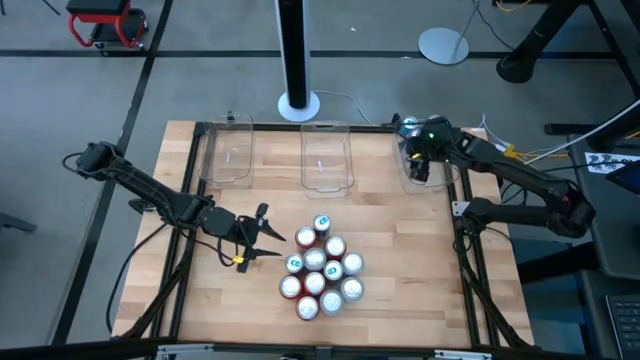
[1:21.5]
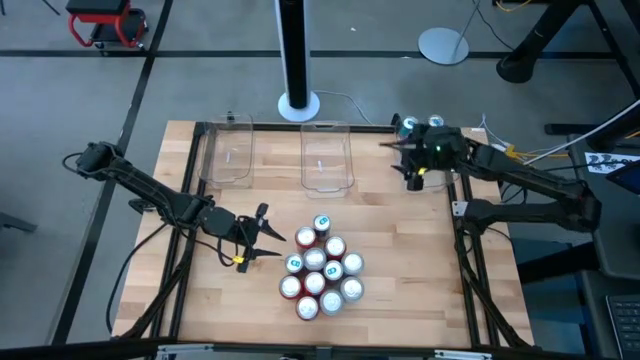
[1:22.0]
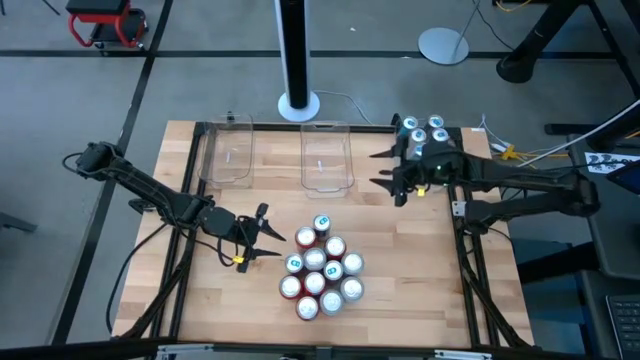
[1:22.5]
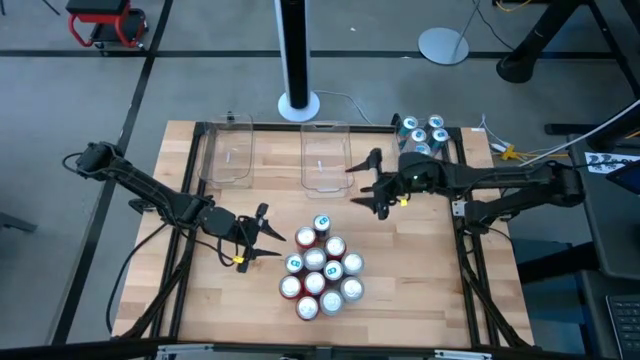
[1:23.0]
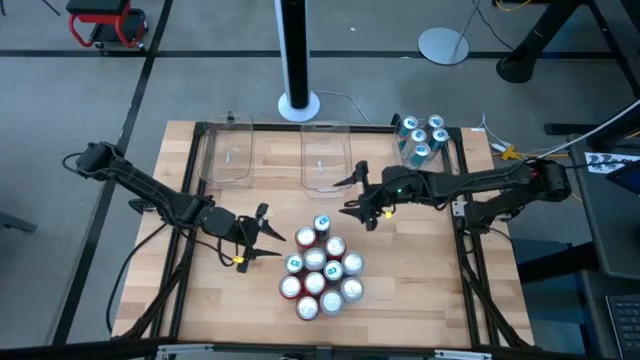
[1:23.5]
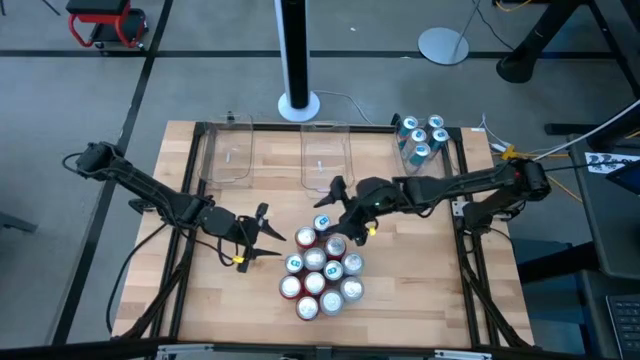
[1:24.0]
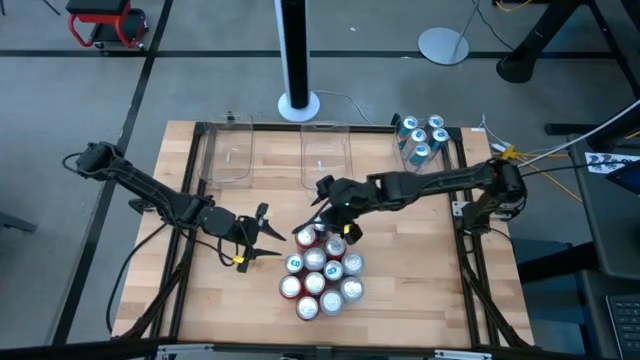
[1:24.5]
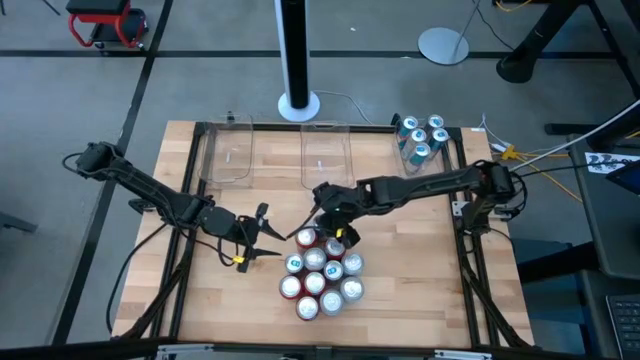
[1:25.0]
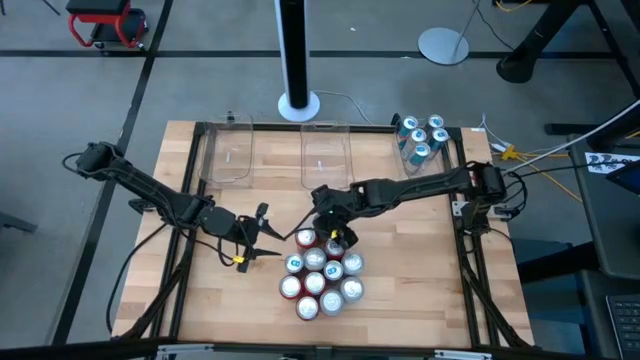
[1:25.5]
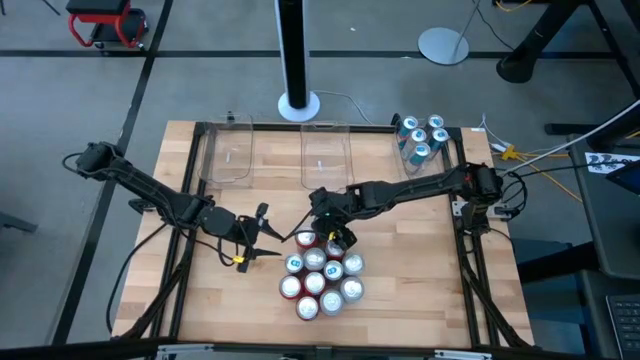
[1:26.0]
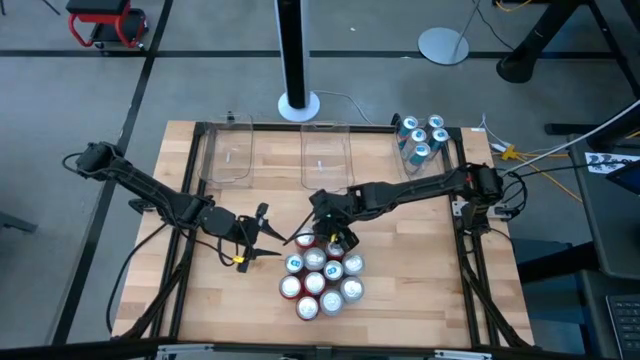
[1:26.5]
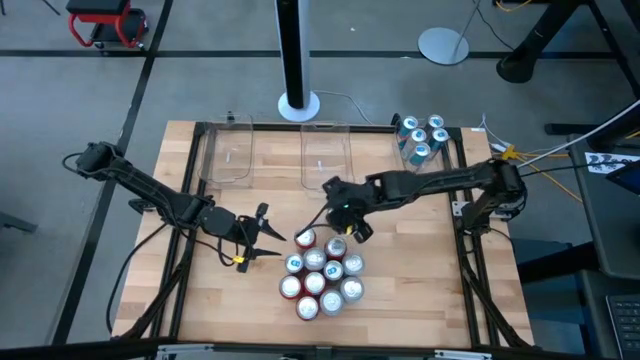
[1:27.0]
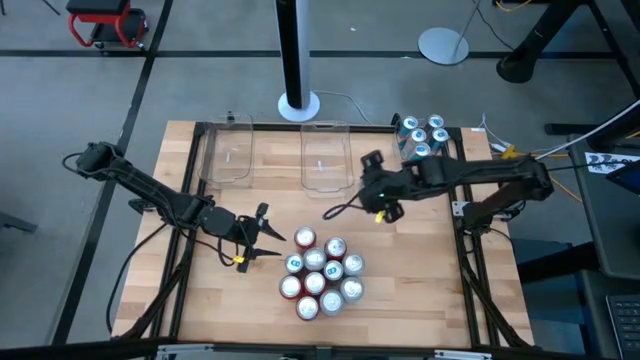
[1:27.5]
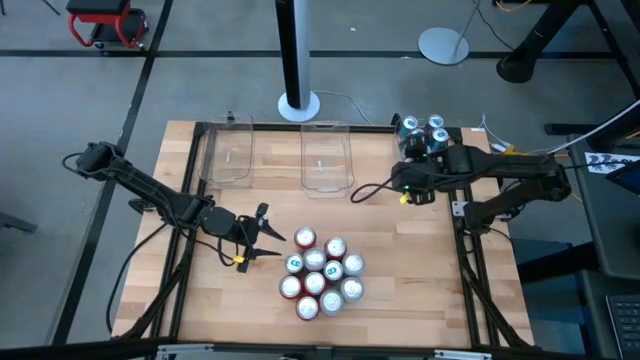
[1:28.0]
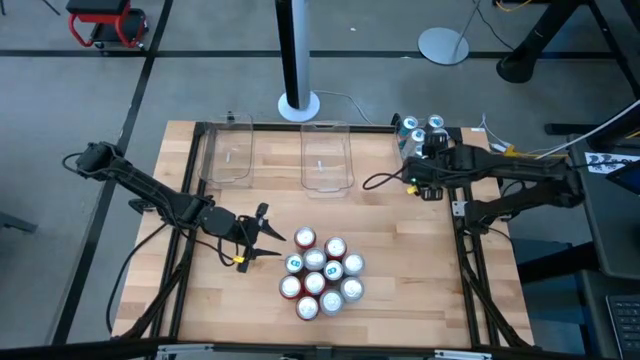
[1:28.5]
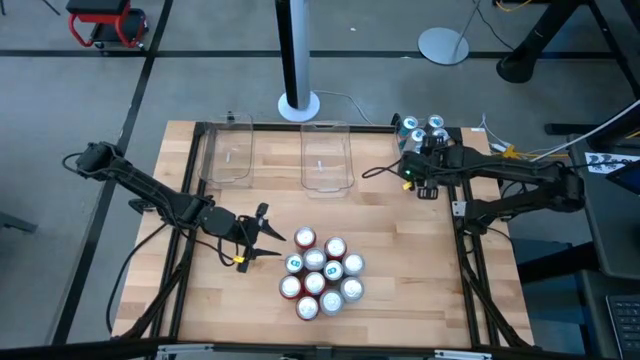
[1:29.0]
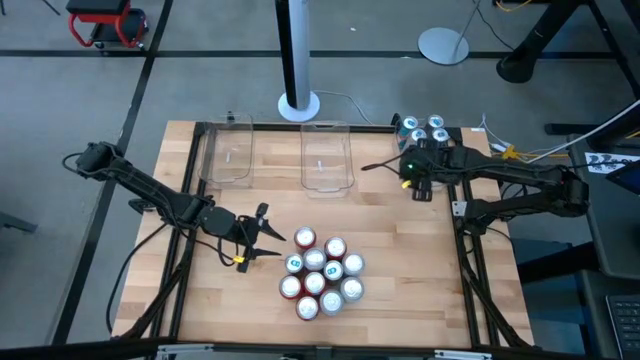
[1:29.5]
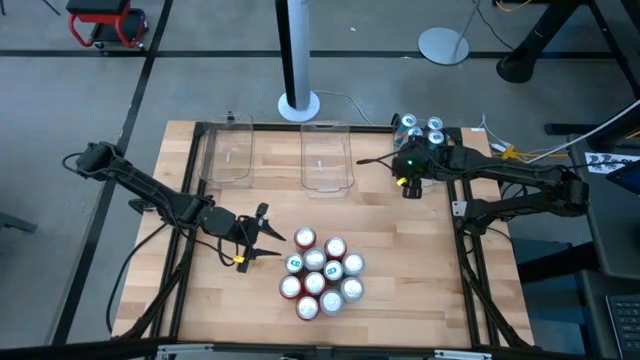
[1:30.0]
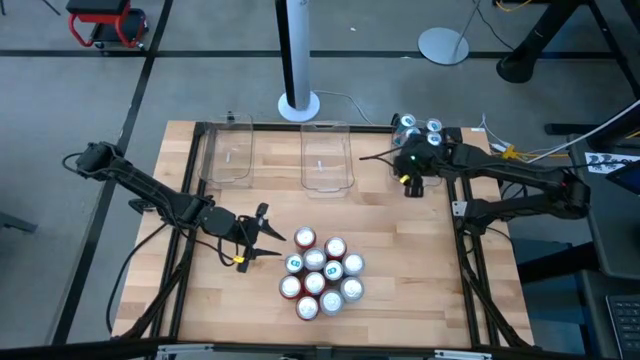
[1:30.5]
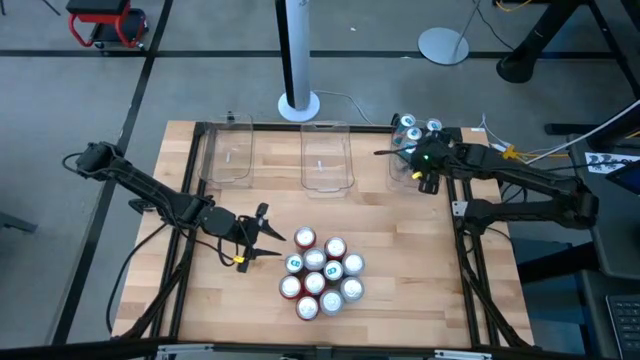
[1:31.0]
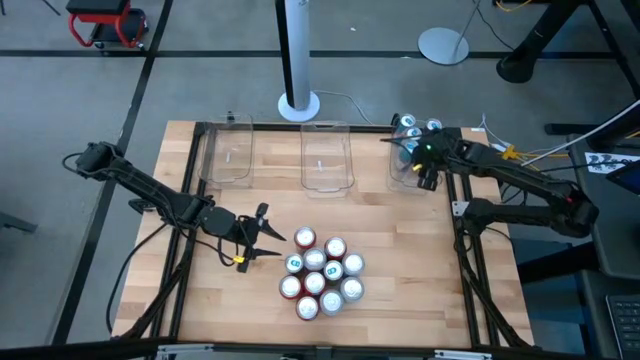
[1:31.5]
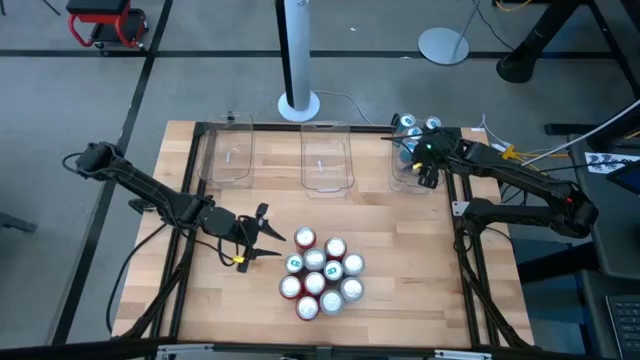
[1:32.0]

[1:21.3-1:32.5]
Task: Sort soda cans
Put the blue soda can into the top right transparent bin

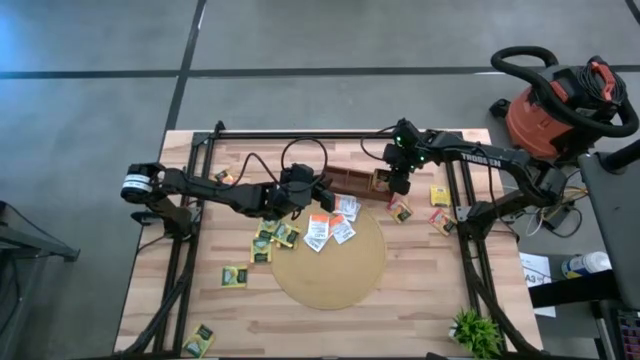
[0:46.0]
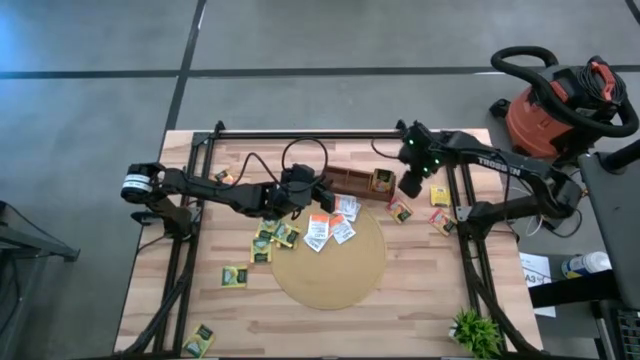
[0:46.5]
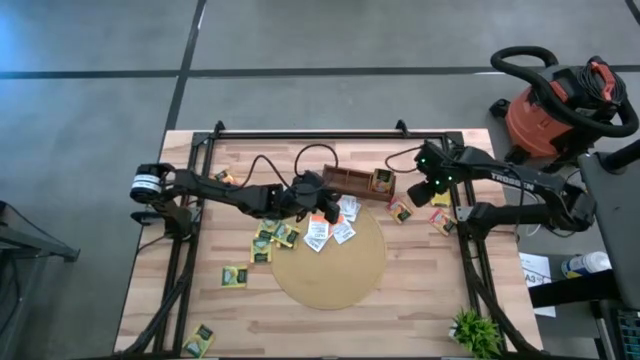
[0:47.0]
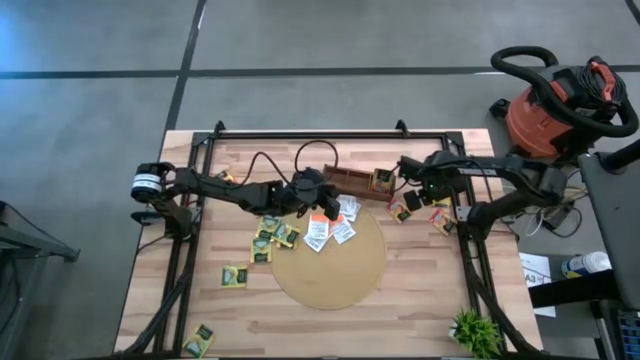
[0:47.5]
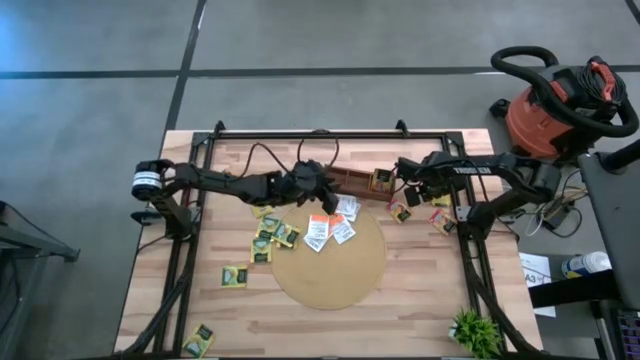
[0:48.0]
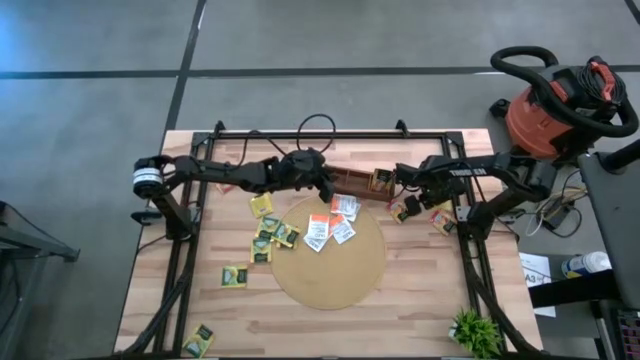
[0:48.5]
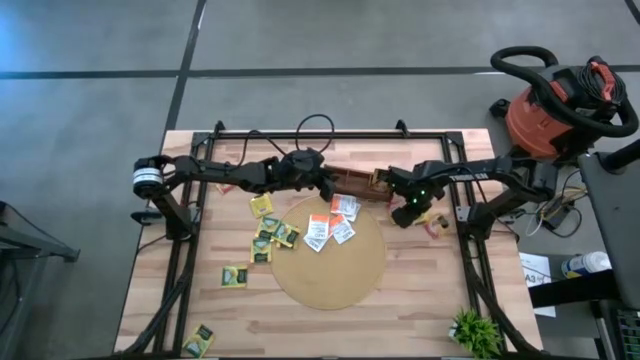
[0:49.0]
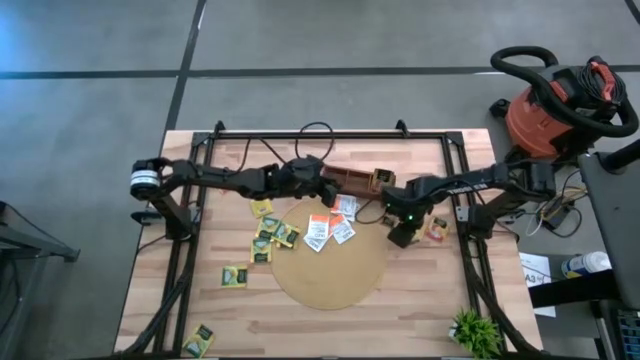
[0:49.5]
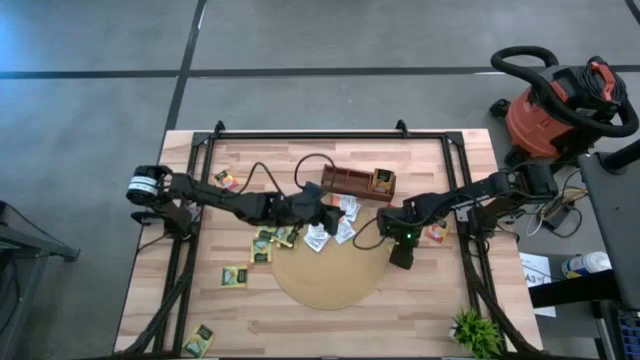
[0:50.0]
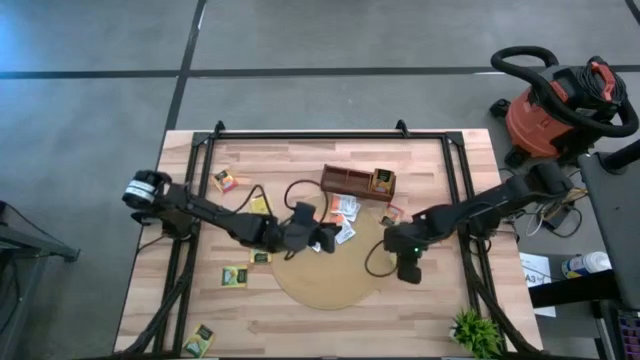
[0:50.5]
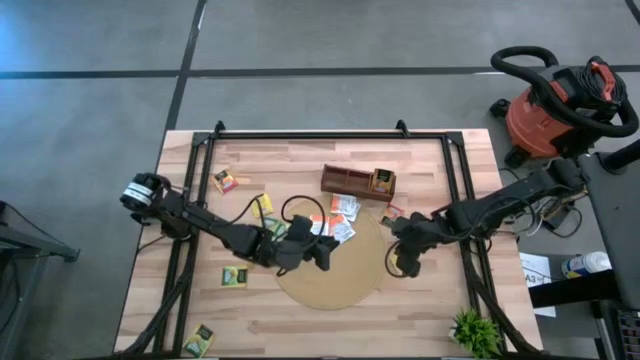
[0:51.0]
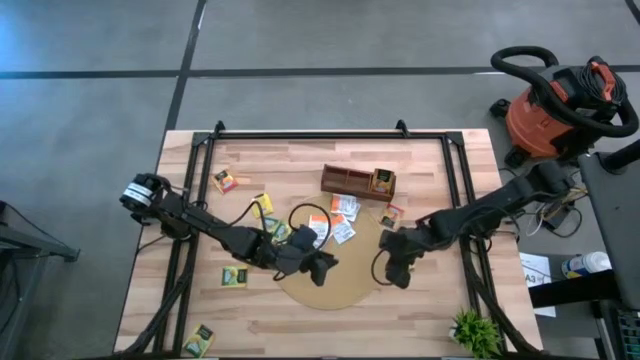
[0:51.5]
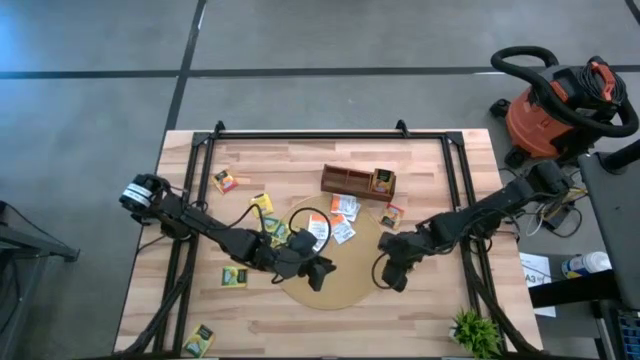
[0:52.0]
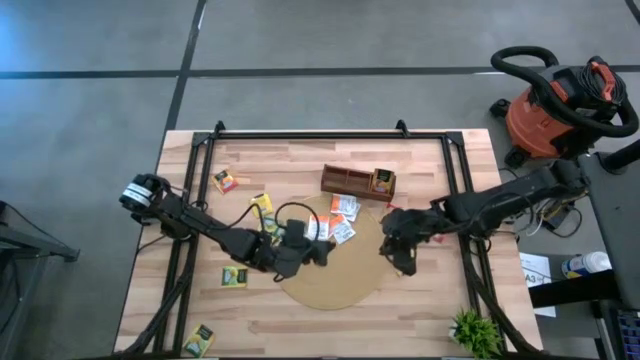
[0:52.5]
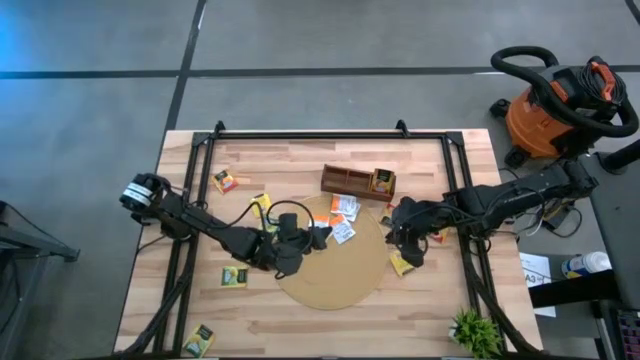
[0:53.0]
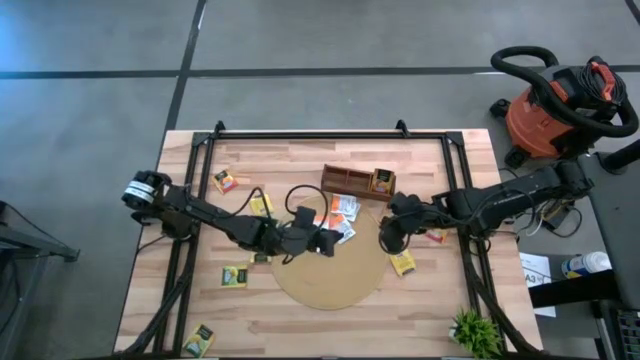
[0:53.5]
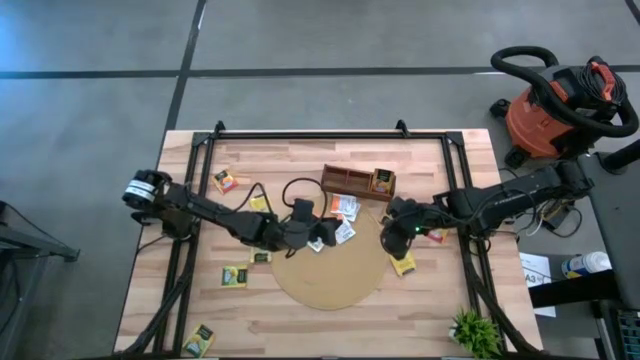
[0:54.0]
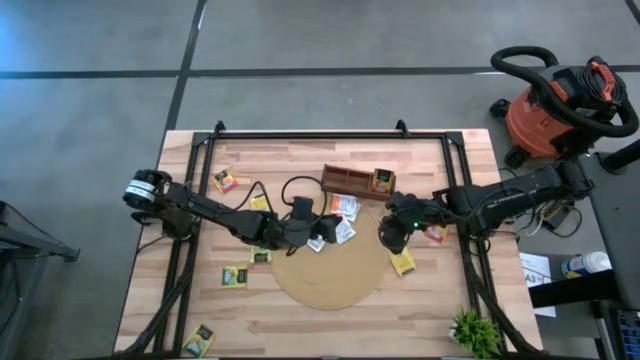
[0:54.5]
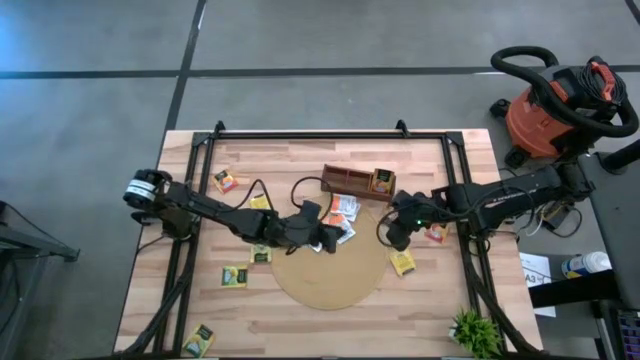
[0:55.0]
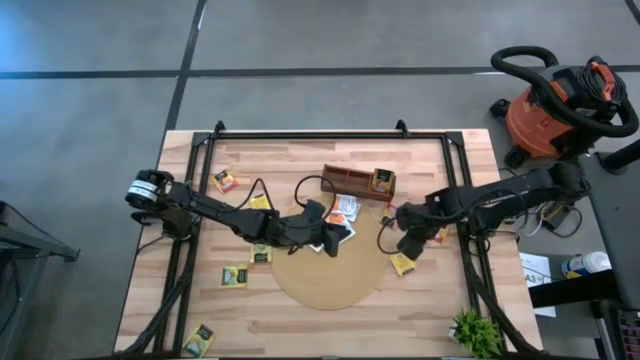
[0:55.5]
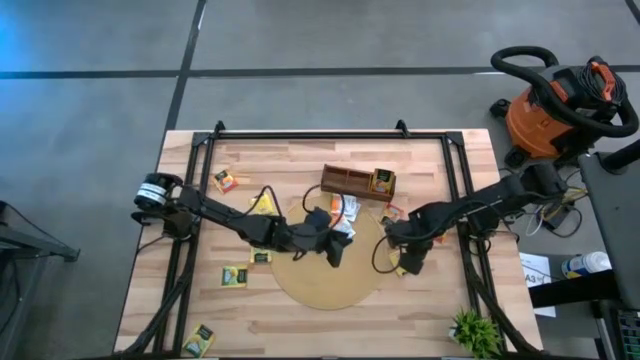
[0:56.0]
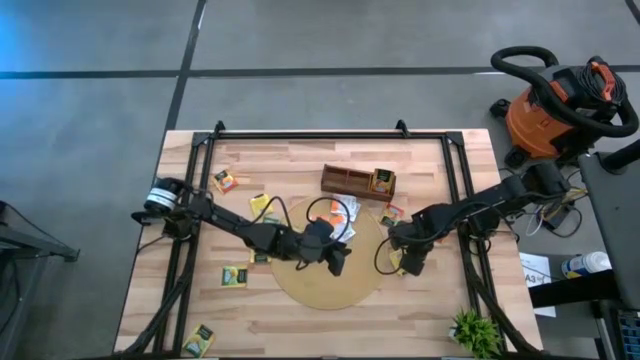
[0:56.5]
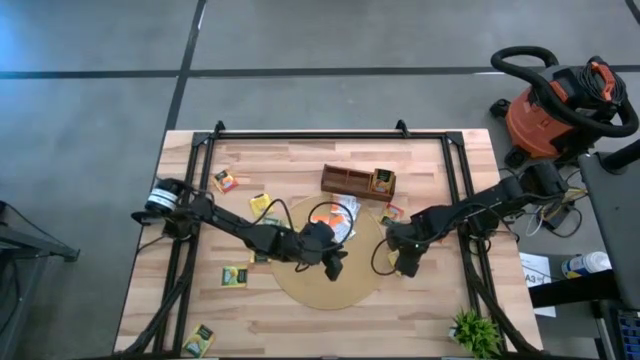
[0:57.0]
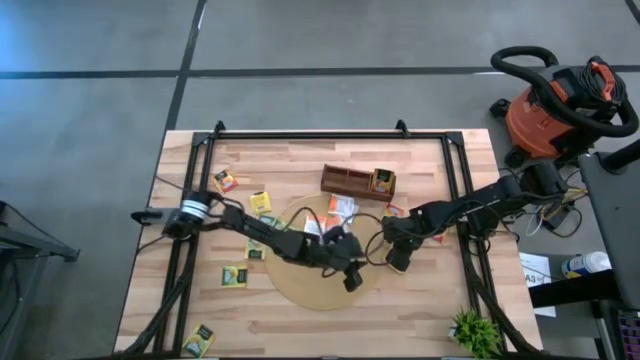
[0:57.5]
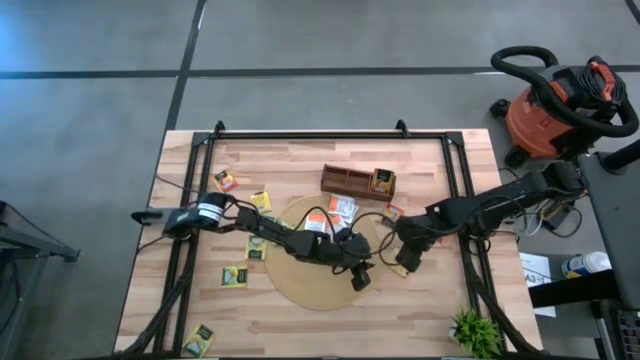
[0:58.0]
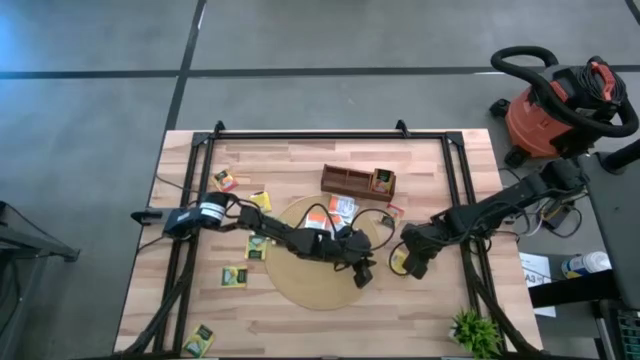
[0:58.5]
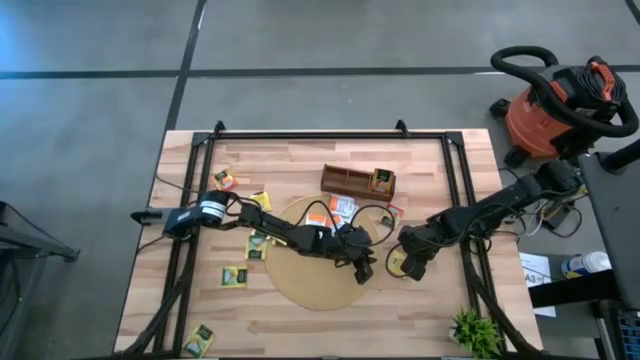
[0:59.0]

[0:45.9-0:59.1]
Task: Pick & Place Tea
Put the lemon tea bag into the middle section of the wooden organizer
